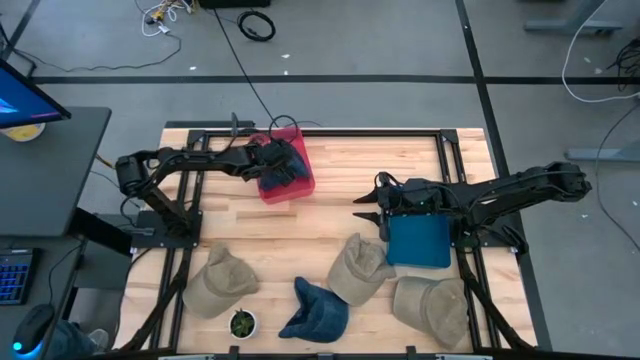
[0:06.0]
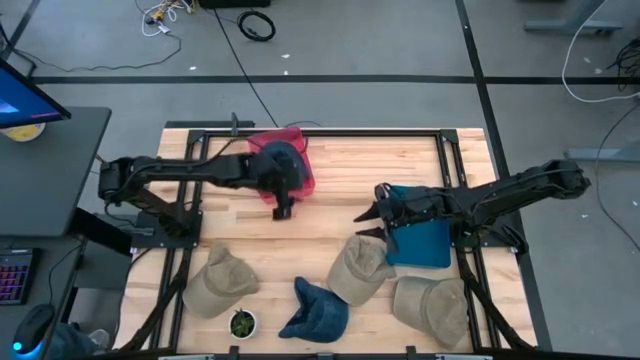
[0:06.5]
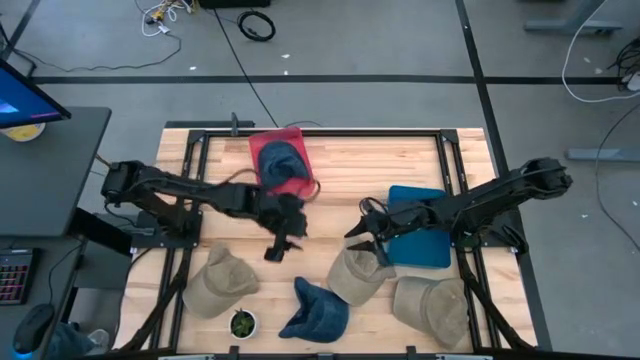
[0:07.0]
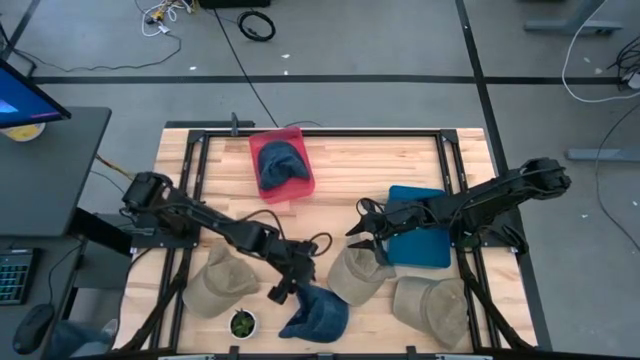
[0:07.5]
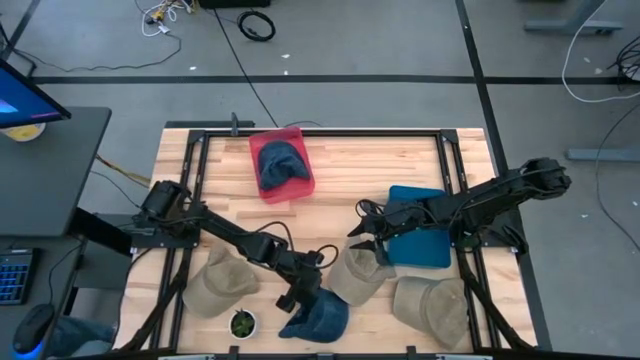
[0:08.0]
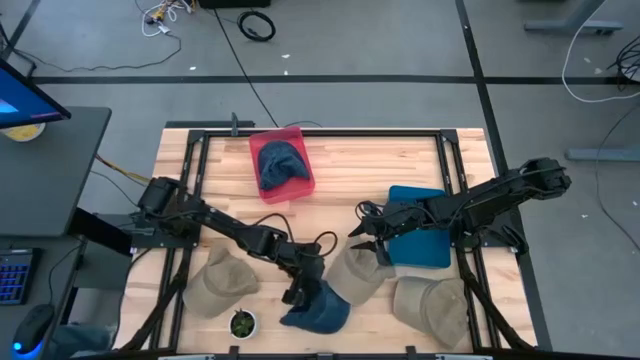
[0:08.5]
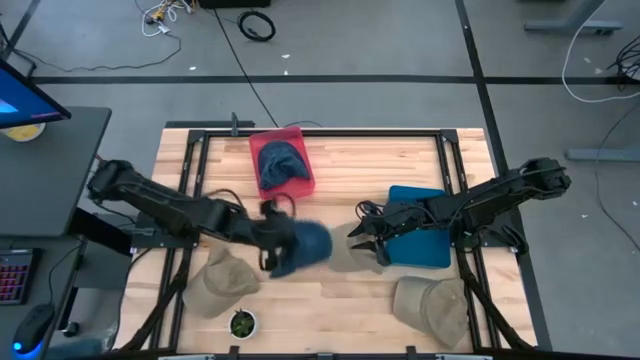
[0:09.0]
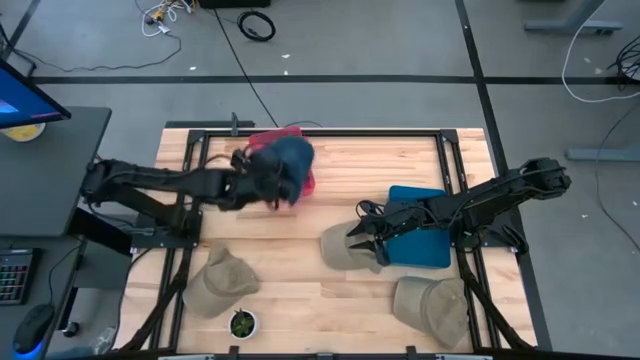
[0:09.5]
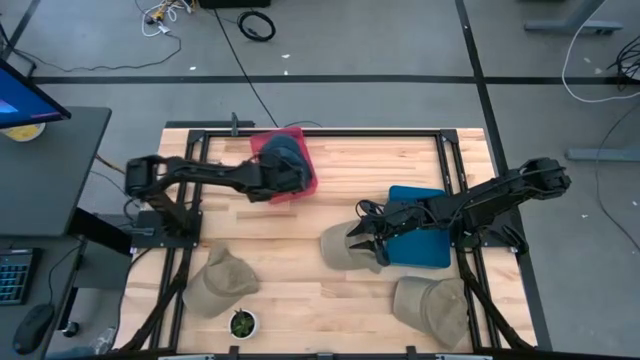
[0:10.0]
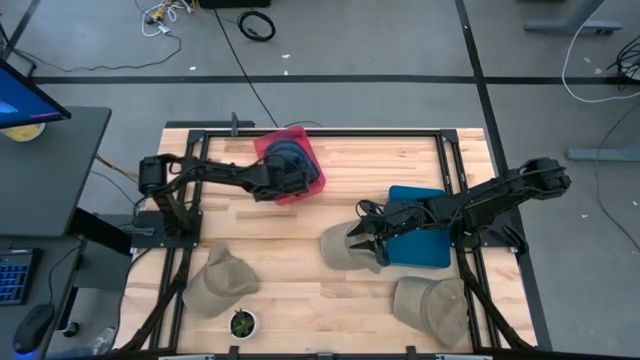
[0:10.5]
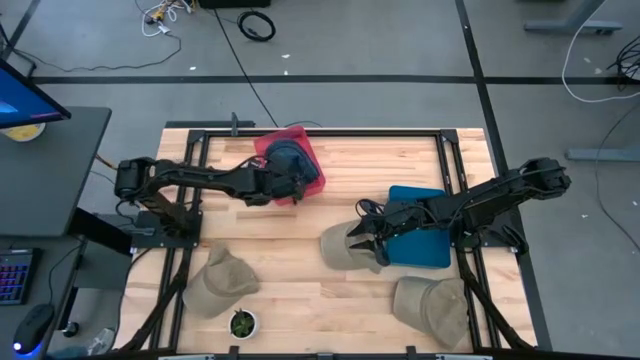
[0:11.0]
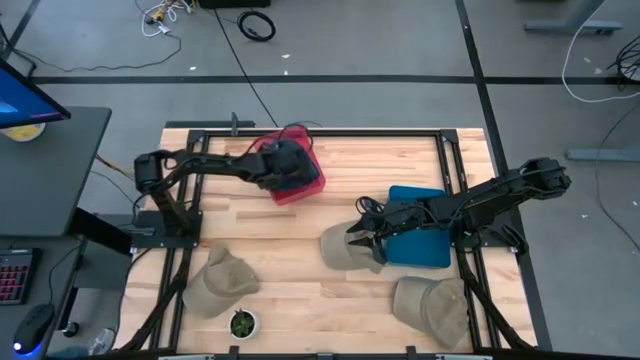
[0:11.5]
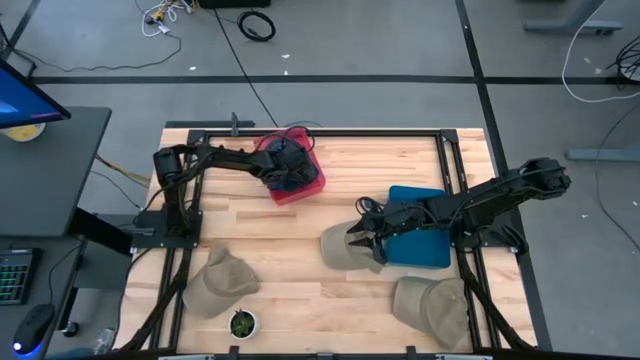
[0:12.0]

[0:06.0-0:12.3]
Task: Pick & Place hat
Put the blue cap into the red bin

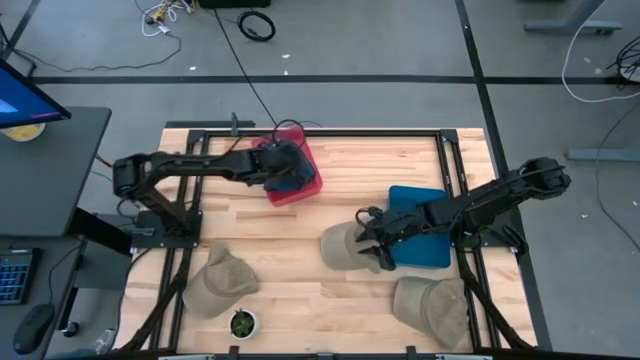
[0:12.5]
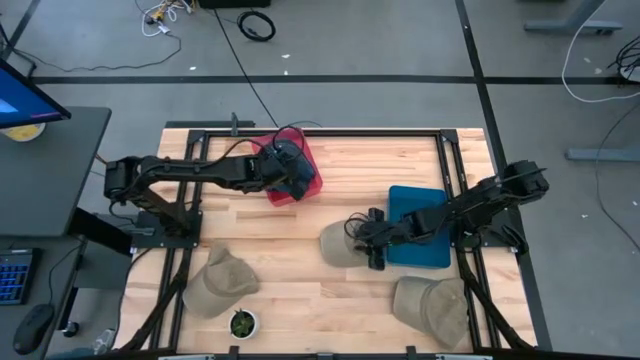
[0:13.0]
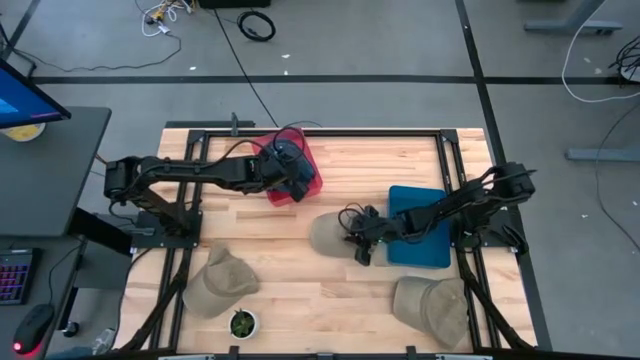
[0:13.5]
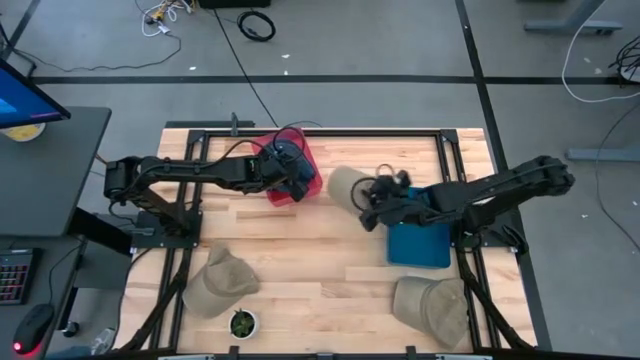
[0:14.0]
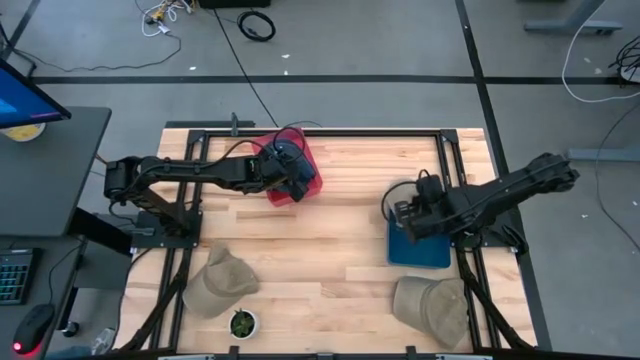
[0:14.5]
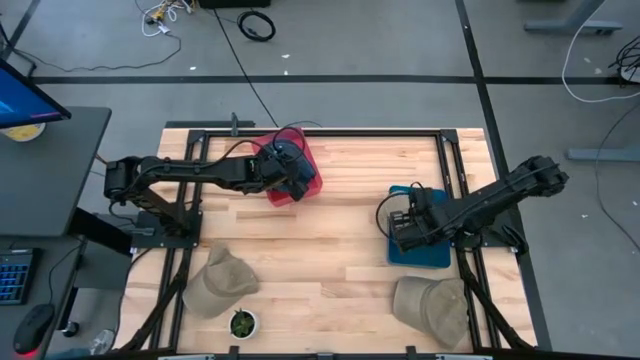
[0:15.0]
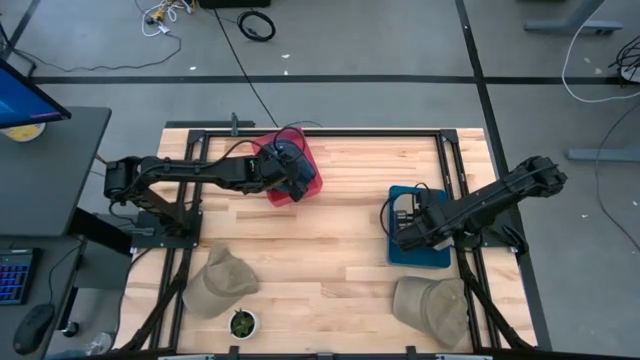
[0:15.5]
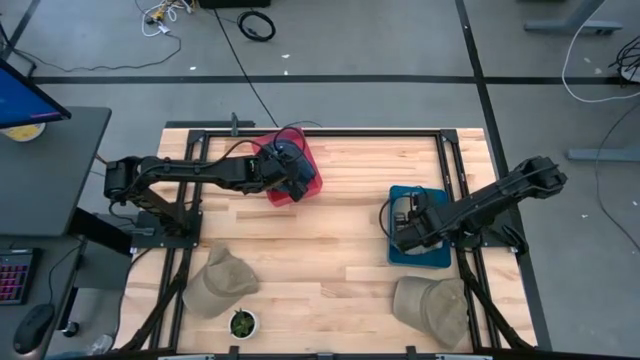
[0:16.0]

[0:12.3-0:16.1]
Put the middle brown cap into the blue bin

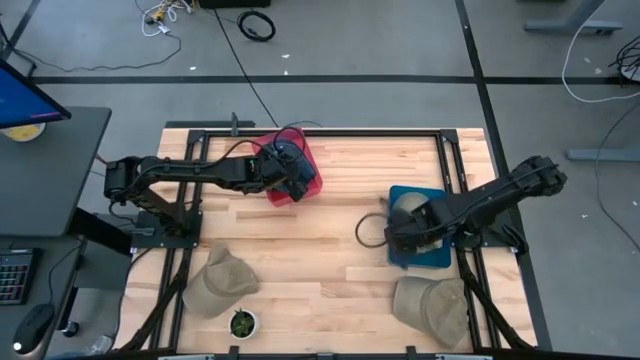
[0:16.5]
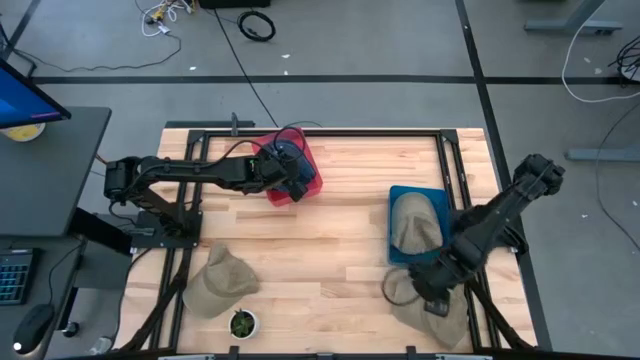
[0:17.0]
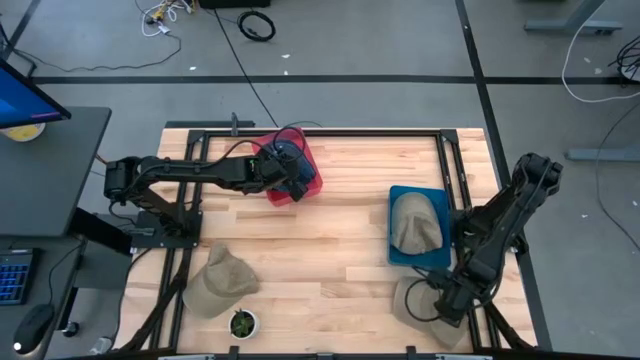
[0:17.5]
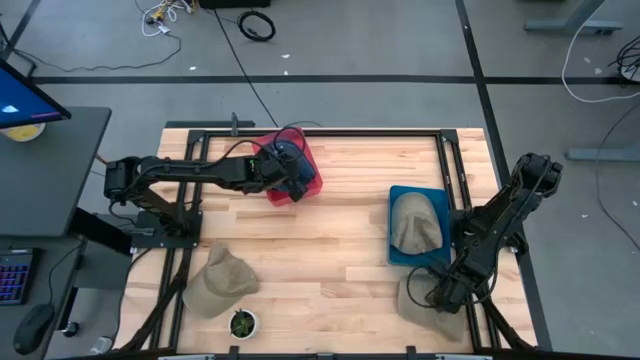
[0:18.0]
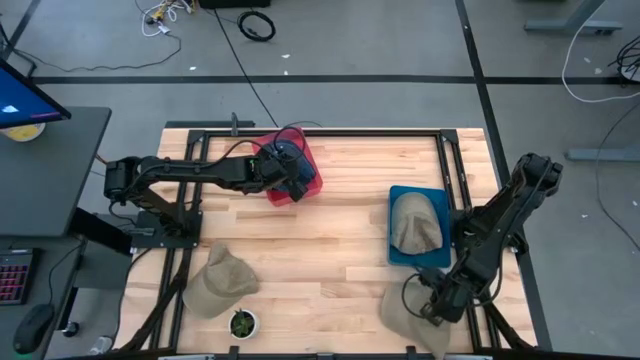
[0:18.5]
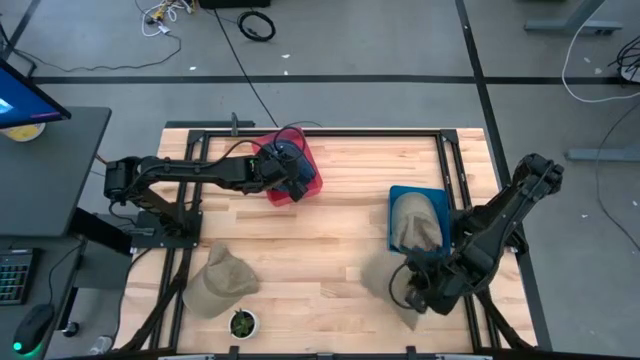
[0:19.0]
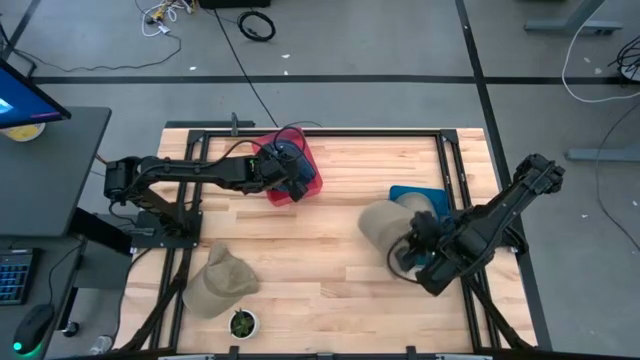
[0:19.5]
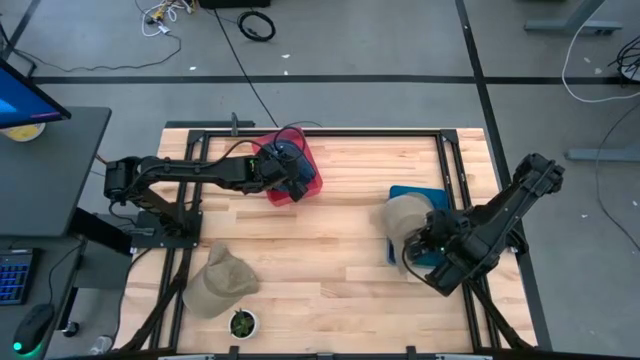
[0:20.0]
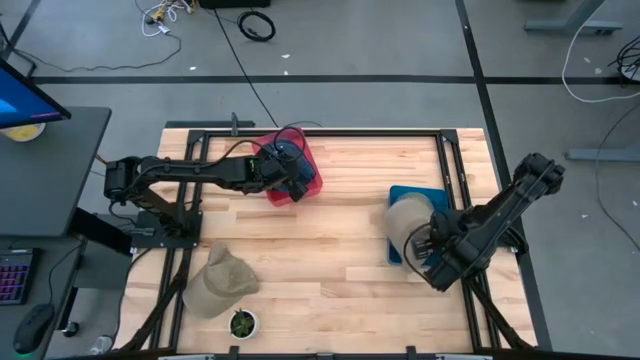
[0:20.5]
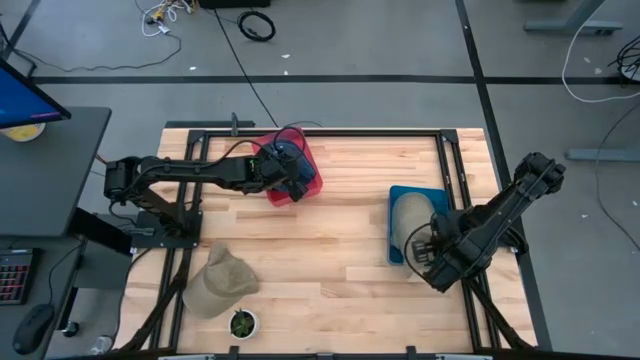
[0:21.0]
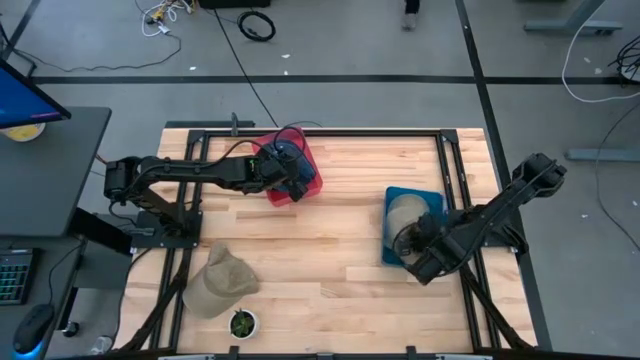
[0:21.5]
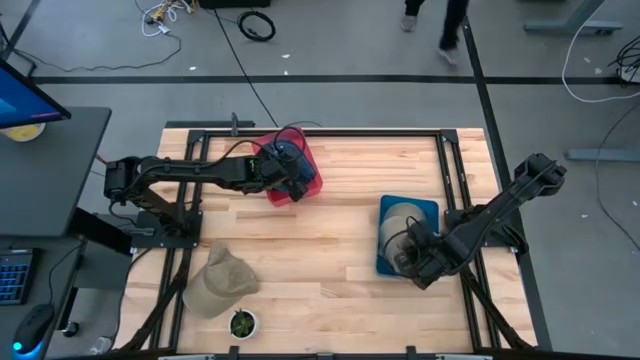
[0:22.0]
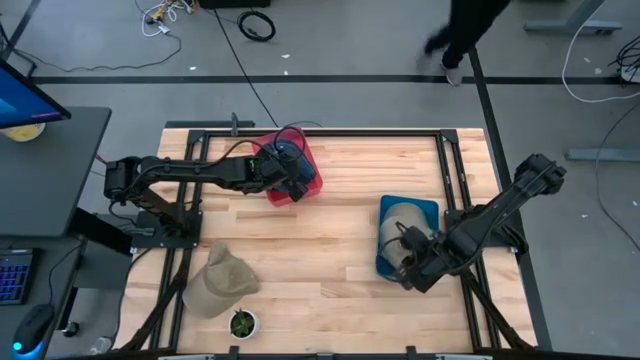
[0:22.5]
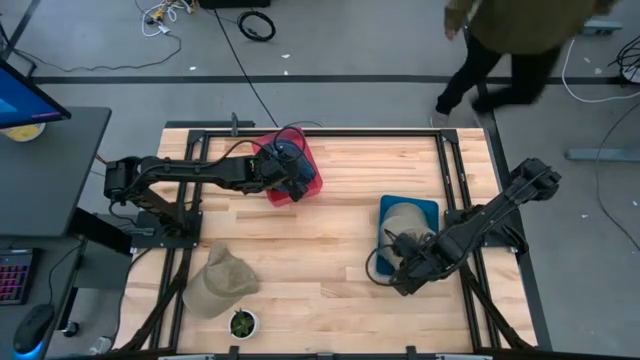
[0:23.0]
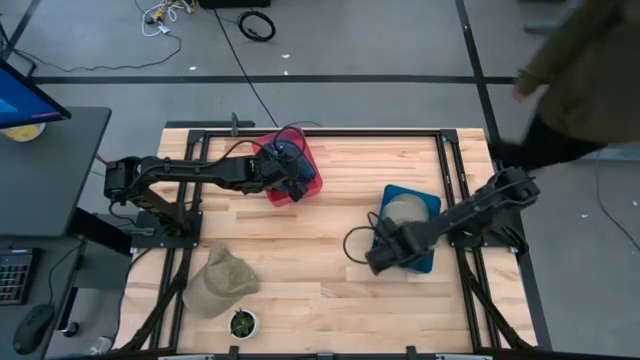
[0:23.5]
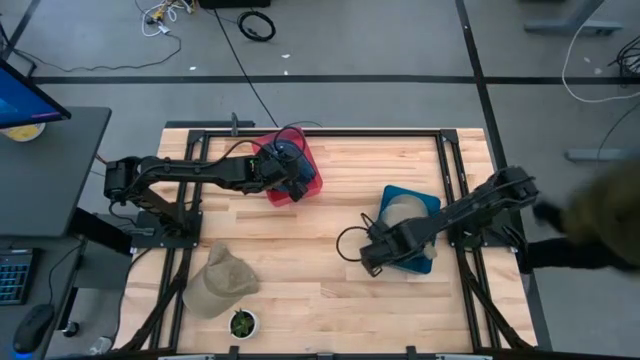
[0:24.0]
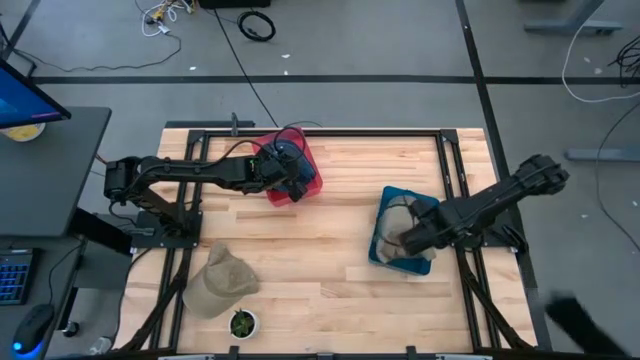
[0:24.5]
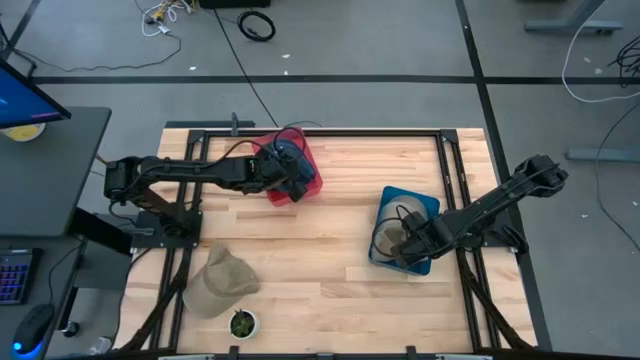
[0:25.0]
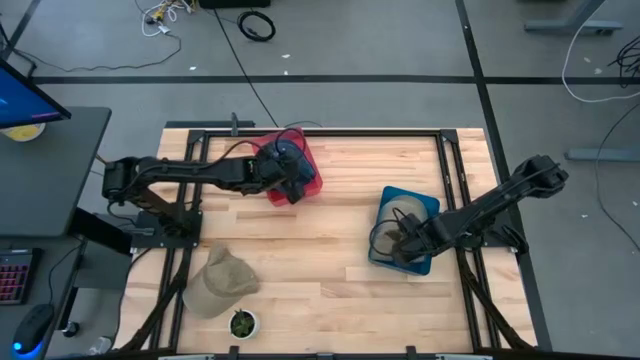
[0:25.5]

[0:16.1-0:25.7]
Put the right brown cap into the blue bin

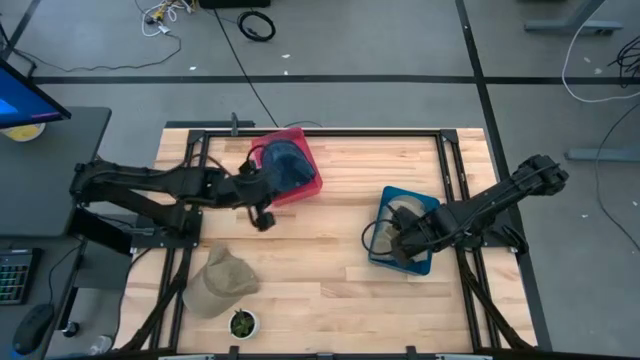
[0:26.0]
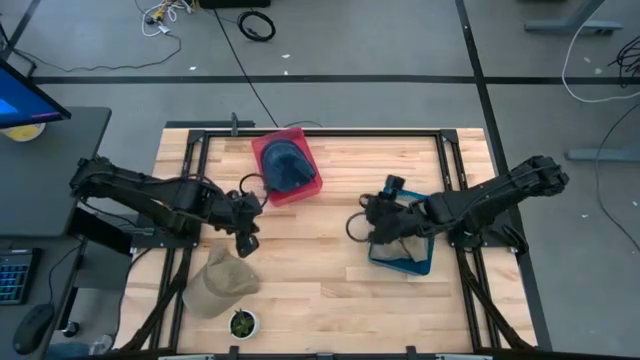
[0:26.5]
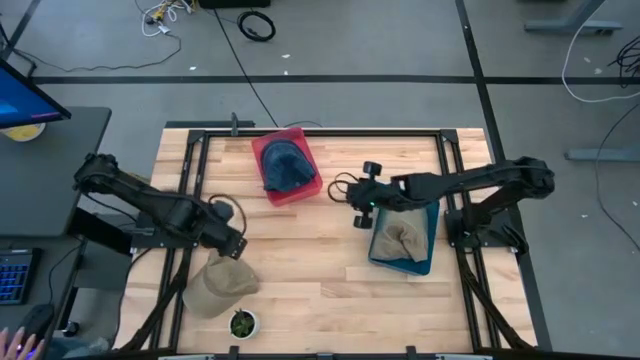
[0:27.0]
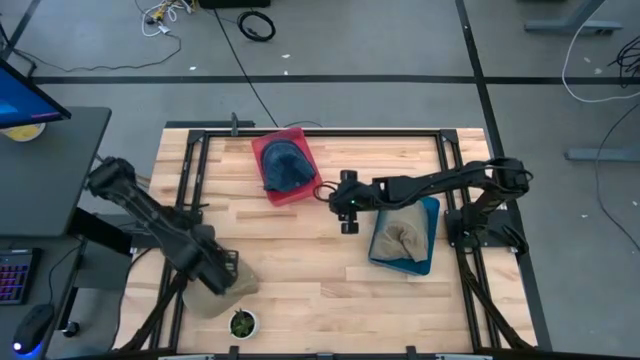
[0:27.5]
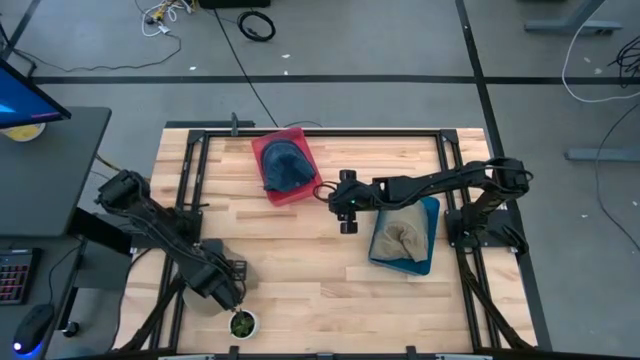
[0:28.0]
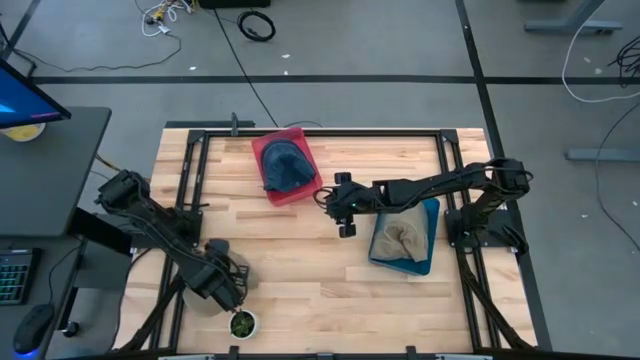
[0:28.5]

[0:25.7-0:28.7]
Put the brown cap into the blue bin
